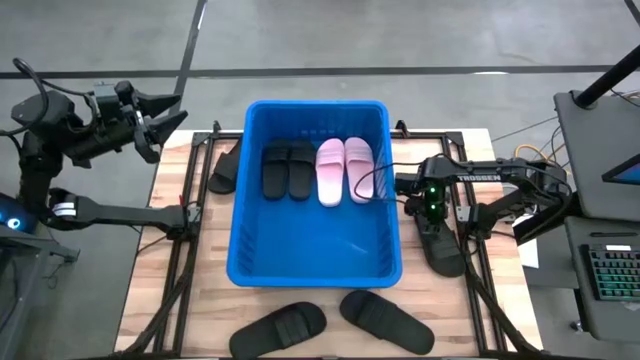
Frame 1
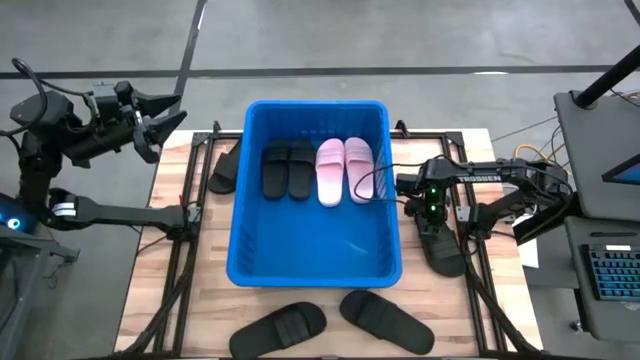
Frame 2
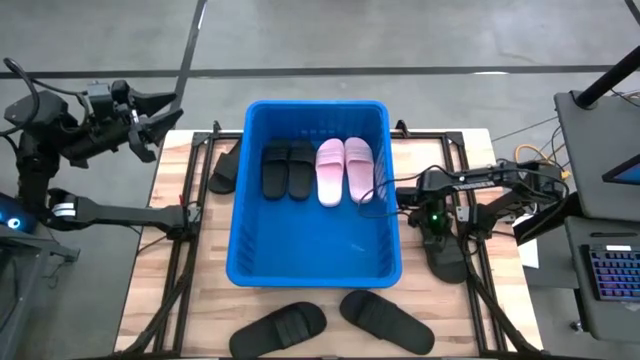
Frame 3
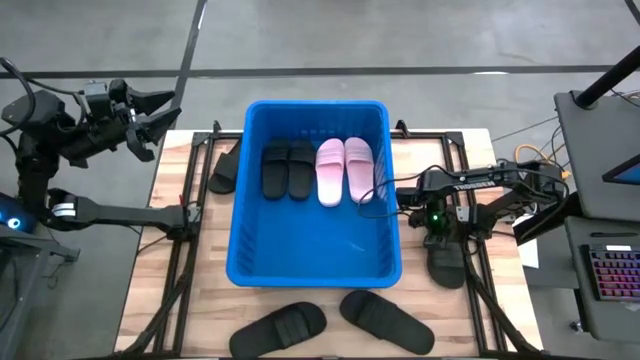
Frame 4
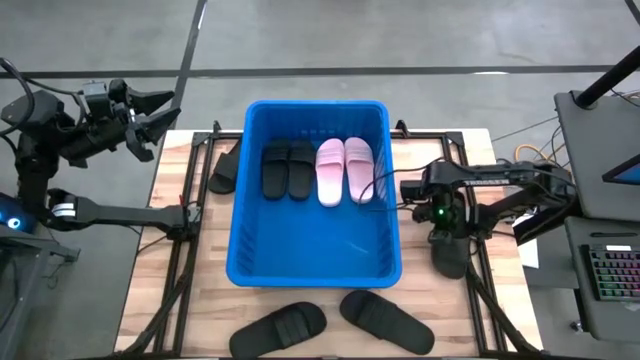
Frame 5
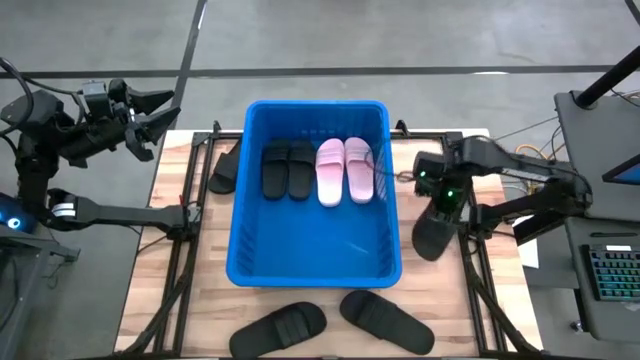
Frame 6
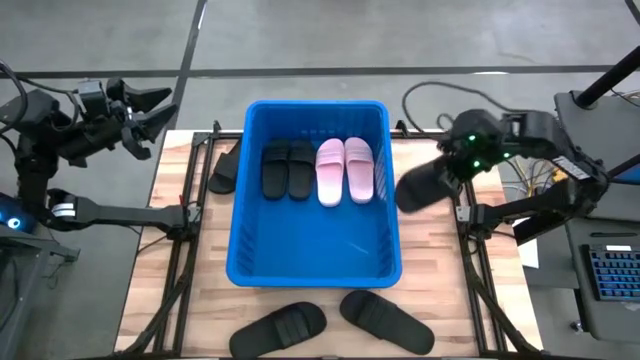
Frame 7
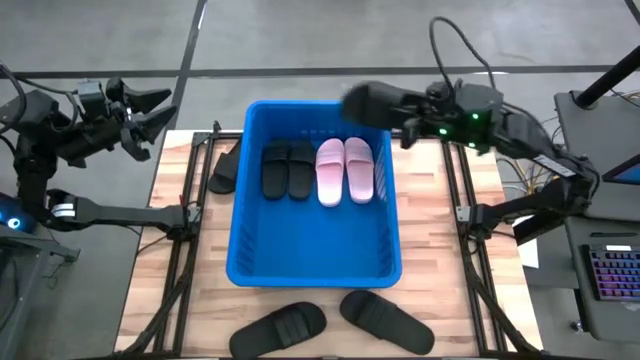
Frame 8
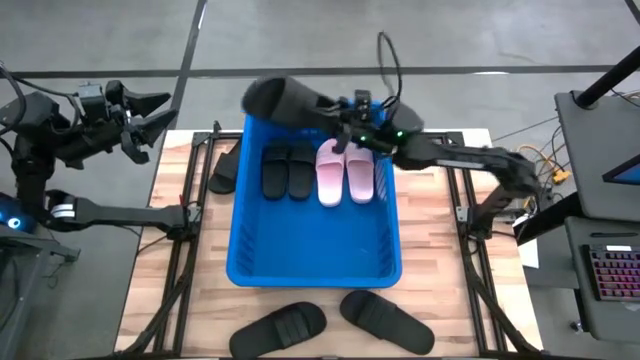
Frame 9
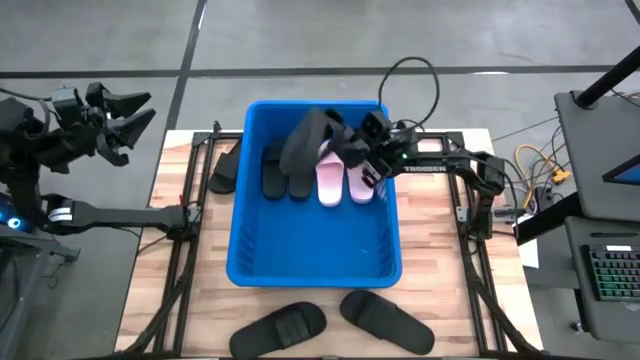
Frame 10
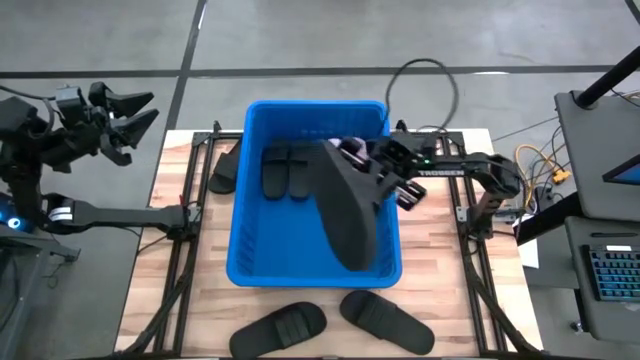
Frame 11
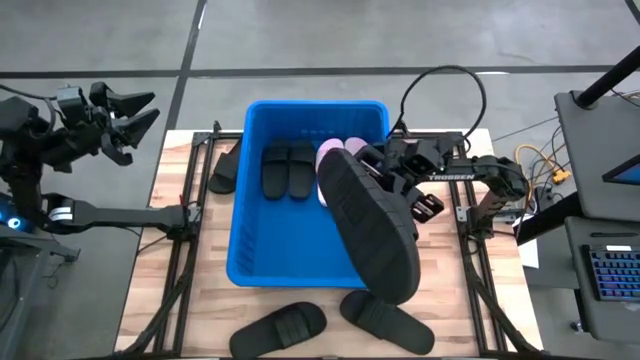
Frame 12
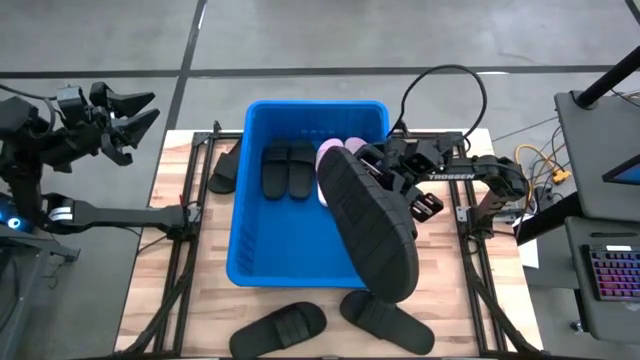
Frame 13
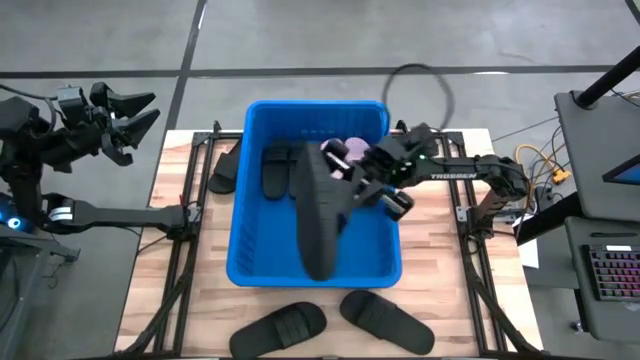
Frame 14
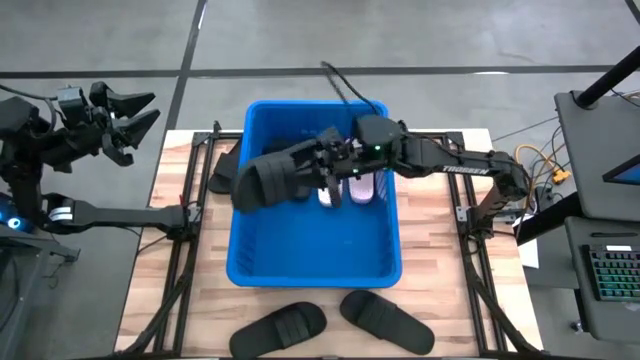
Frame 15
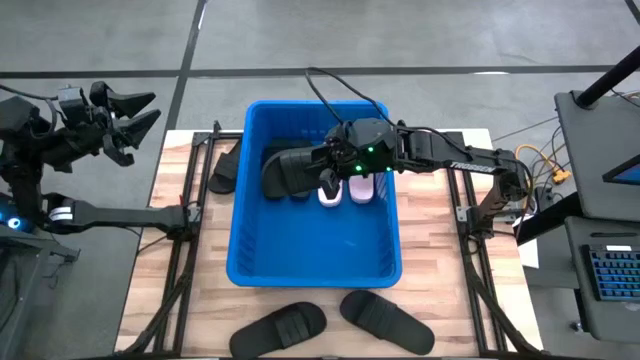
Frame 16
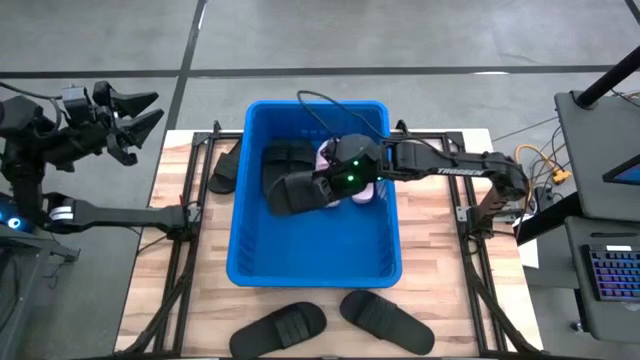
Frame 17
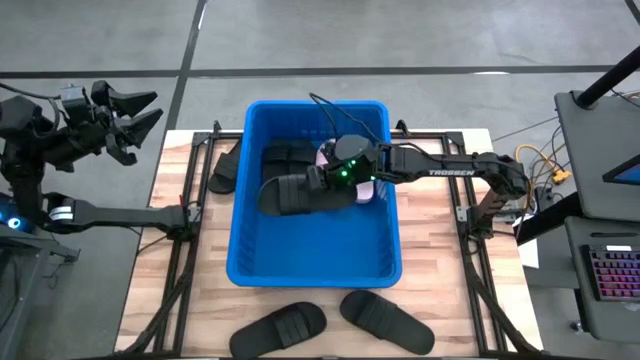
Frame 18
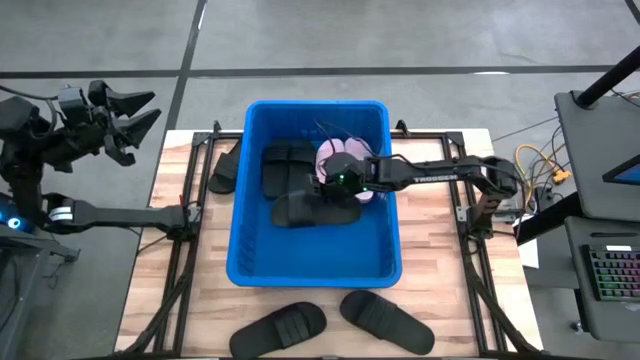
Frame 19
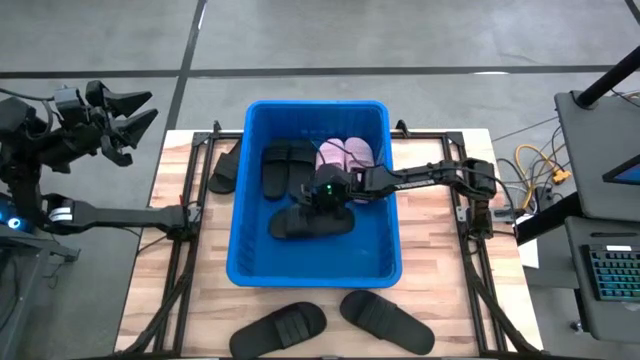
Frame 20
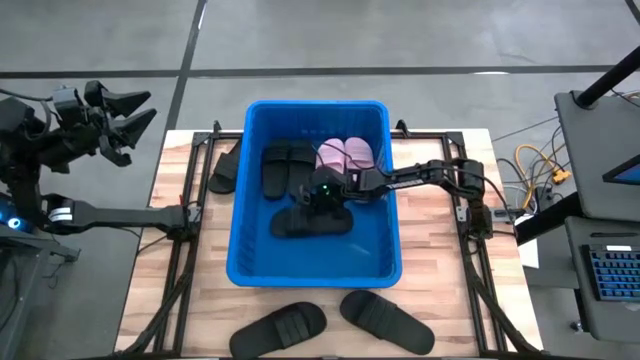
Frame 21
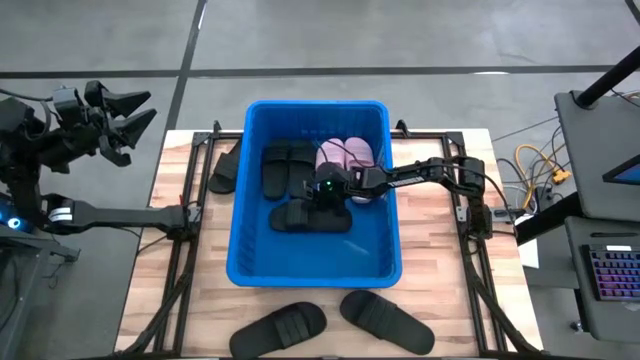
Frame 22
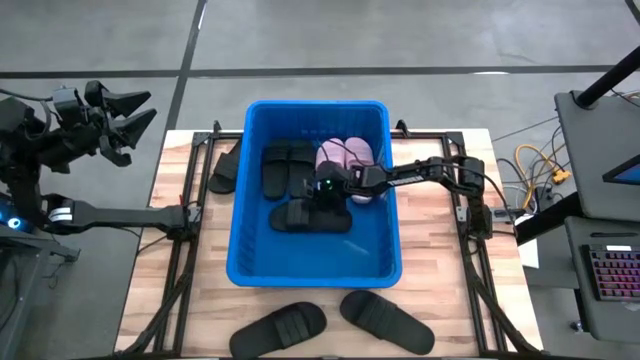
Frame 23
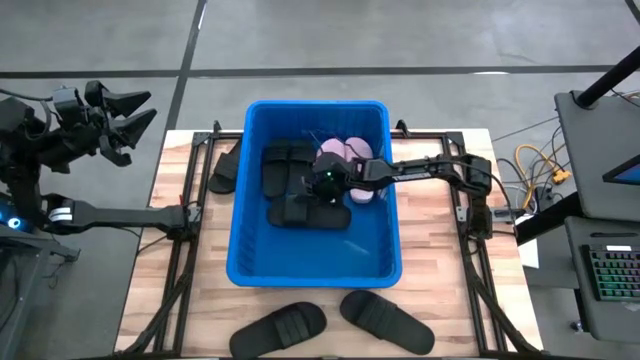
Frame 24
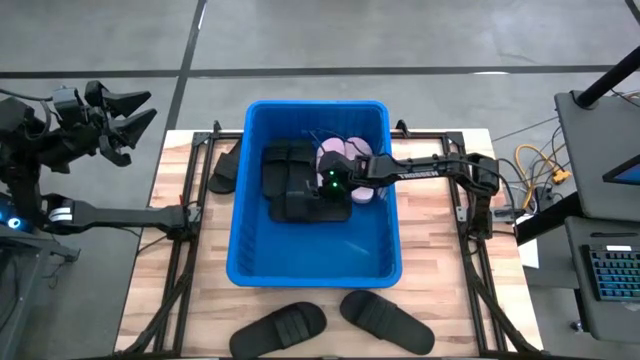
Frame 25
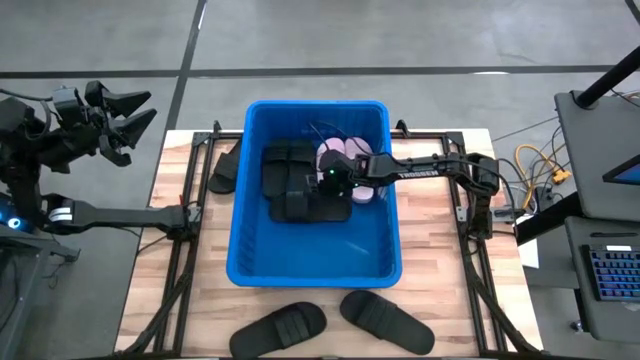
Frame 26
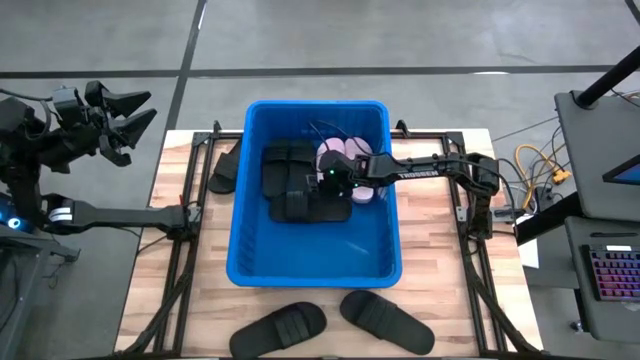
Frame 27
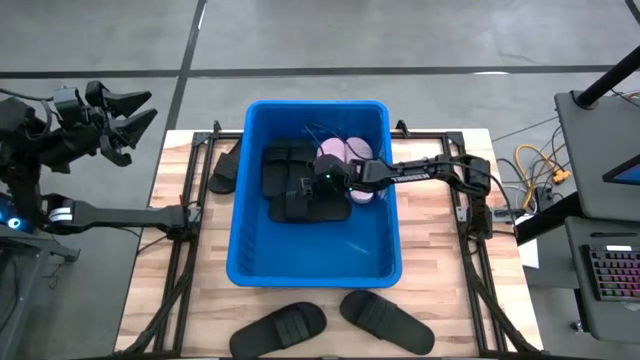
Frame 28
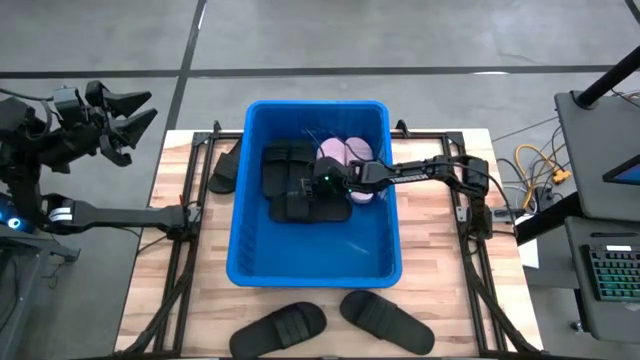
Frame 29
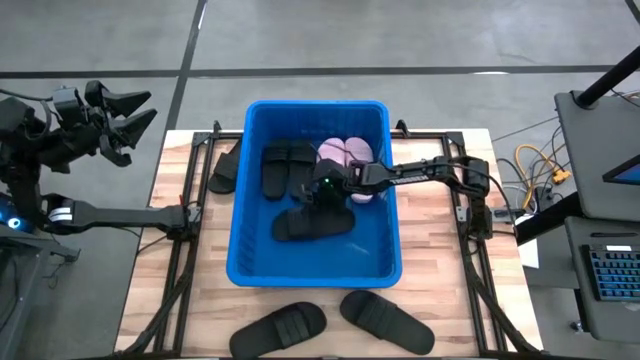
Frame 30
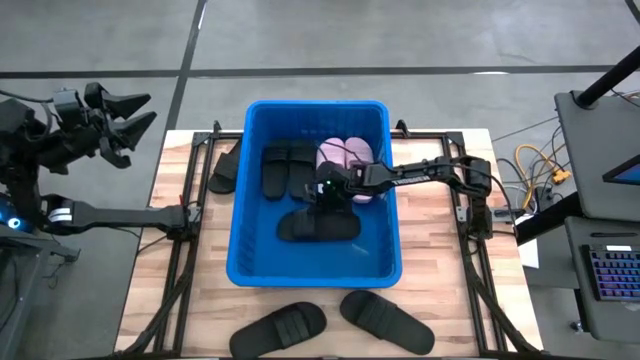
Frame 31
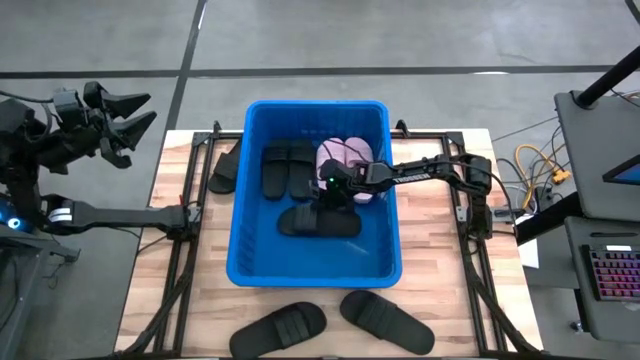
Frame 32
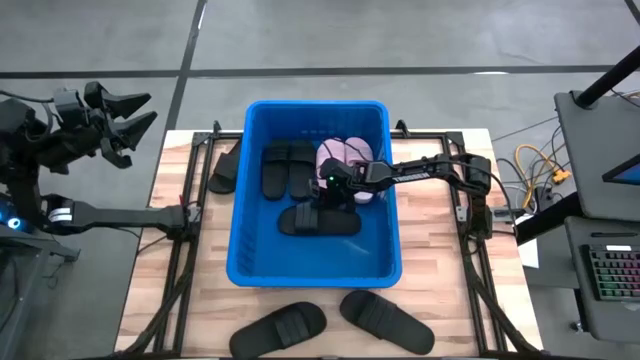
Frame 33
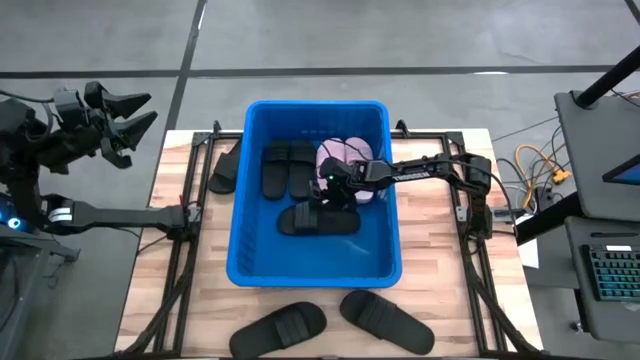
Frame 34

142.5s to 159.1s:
Task: Pick and place slides into bin
Put the black slide into the blue bin

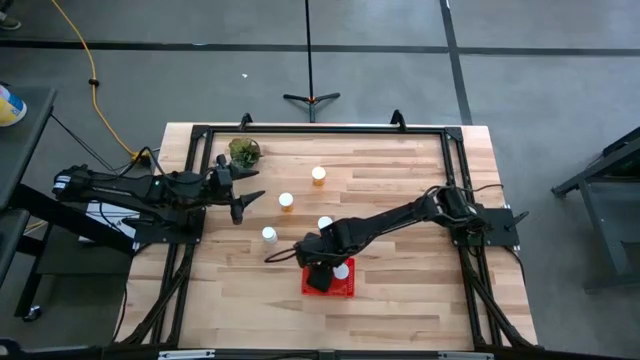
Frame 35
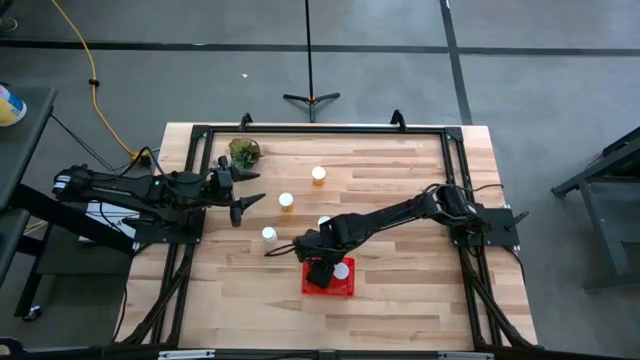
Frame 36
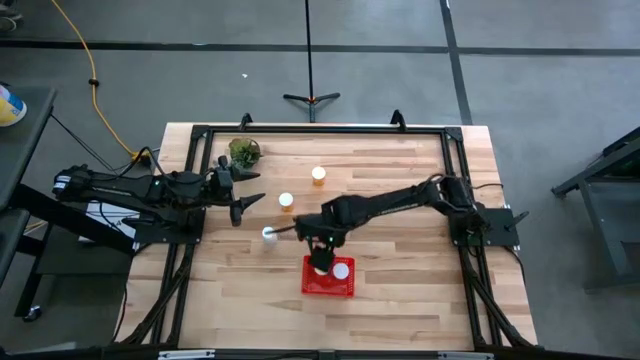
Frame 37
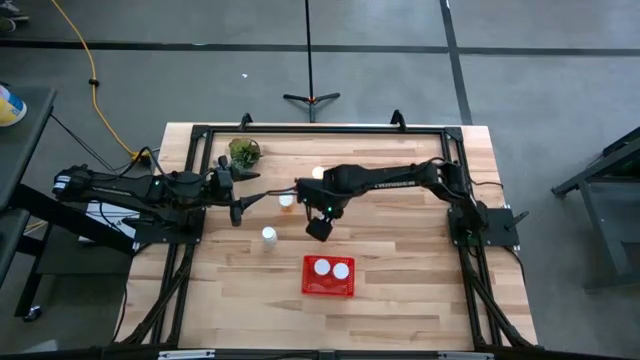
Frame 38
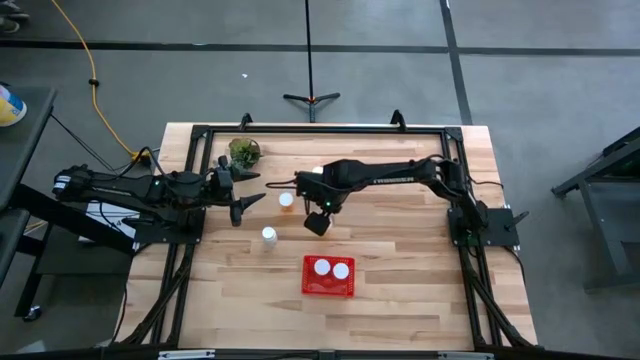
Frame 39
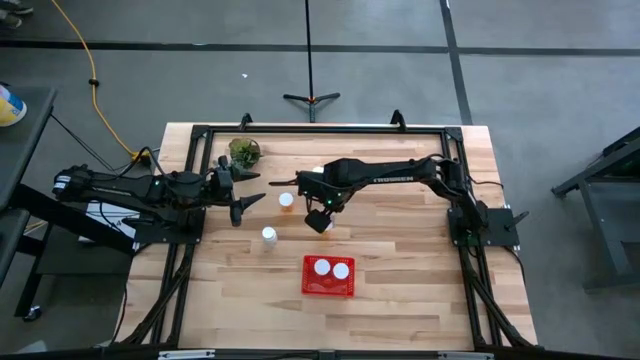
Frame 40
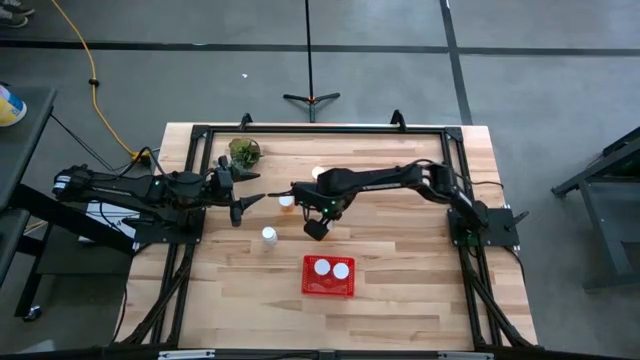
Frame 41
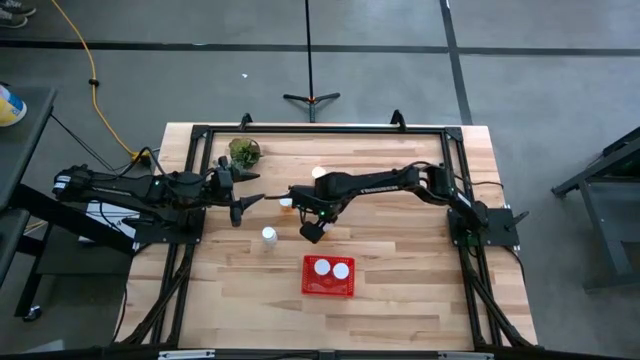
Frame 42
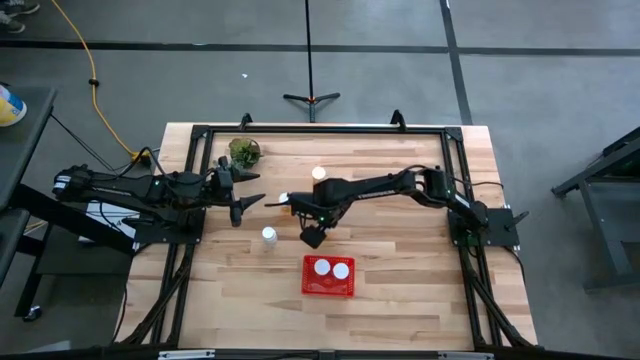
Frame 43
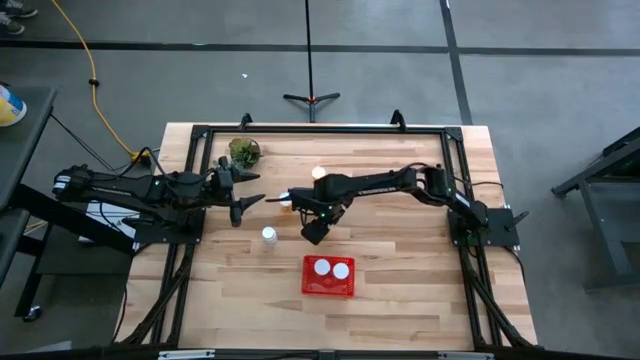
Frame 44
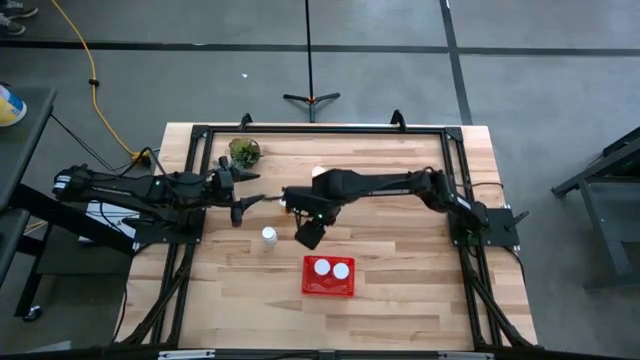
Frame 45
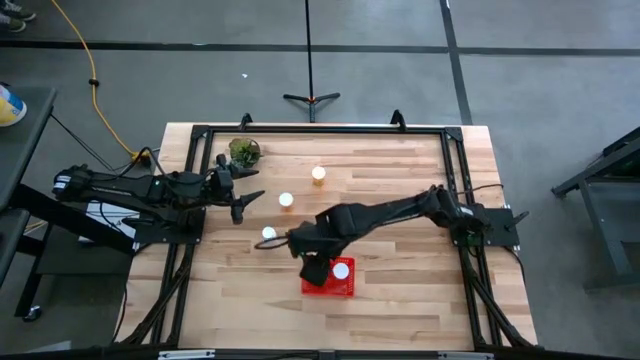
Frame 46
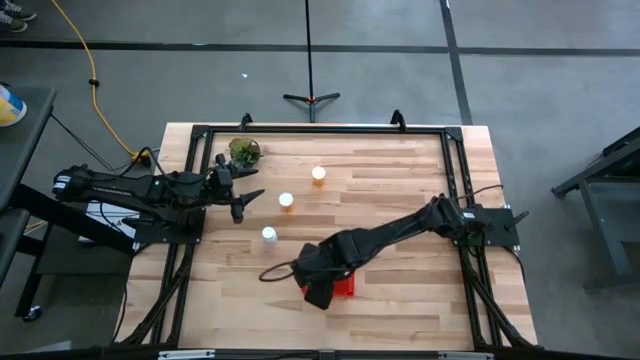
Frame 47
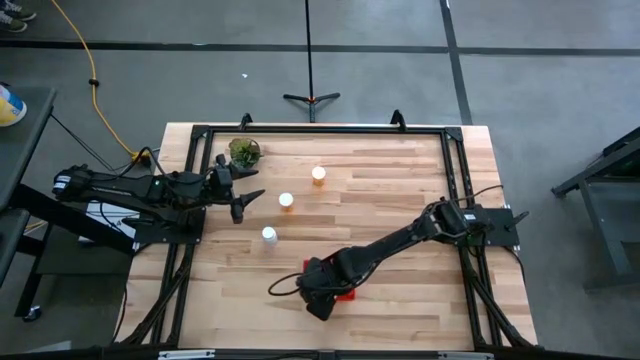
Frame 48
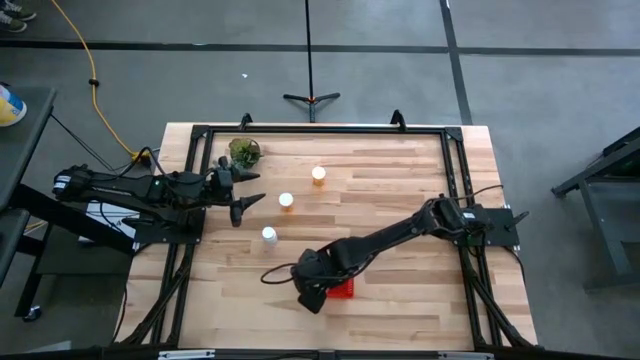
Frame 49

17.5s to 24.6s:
Task: Pick and place pill bottles into a basket
Put the orange pill bottle into the red bin
